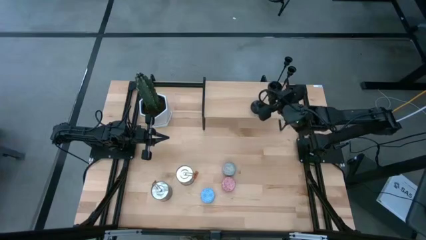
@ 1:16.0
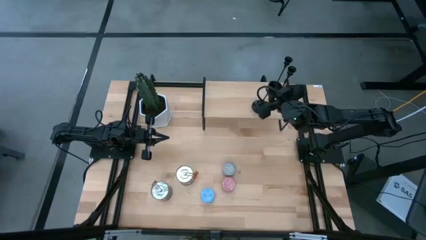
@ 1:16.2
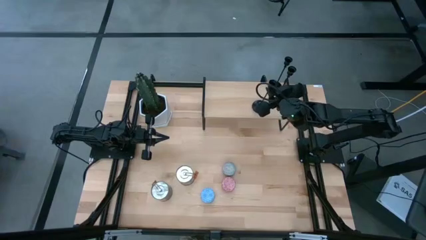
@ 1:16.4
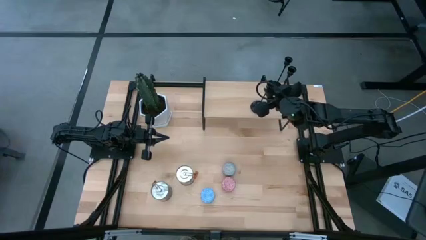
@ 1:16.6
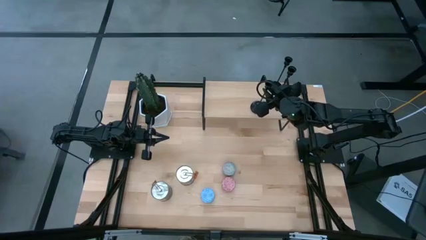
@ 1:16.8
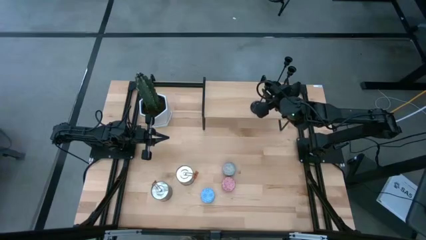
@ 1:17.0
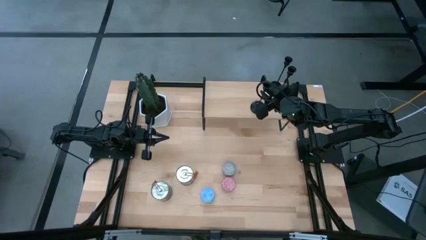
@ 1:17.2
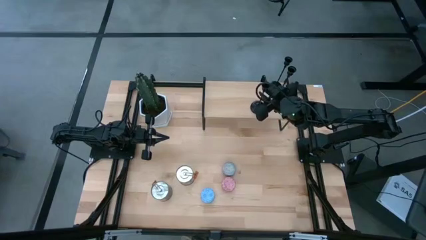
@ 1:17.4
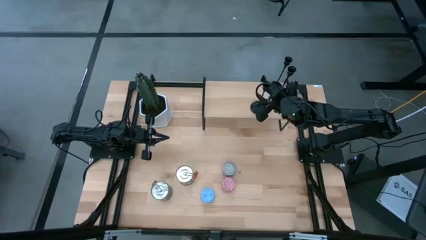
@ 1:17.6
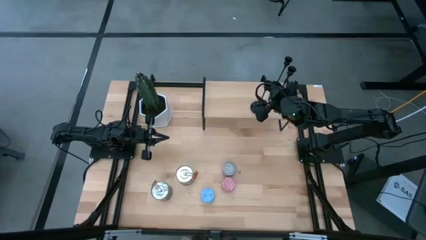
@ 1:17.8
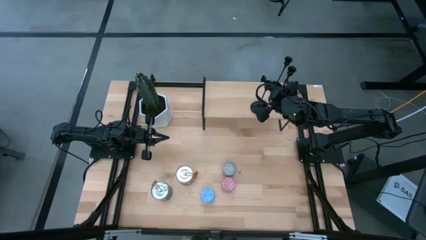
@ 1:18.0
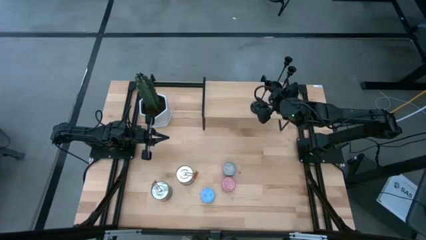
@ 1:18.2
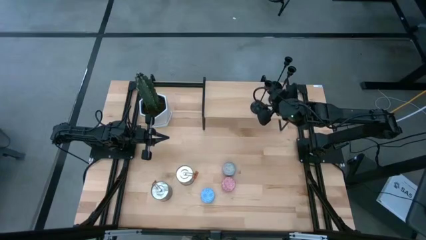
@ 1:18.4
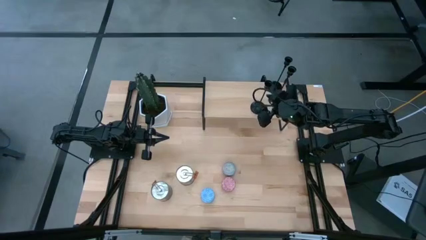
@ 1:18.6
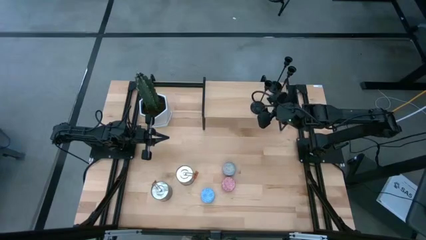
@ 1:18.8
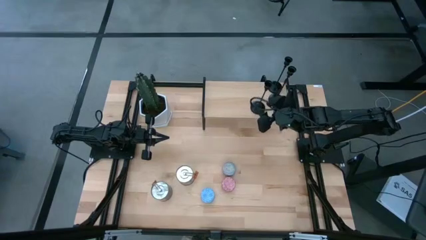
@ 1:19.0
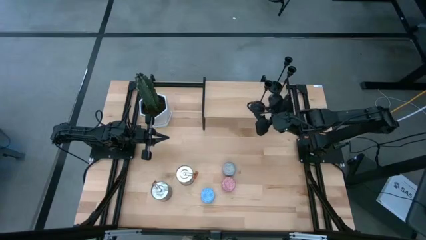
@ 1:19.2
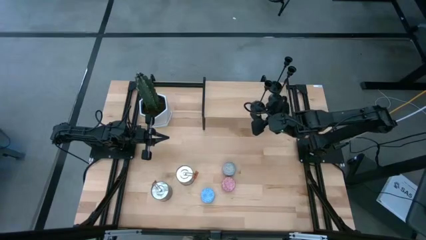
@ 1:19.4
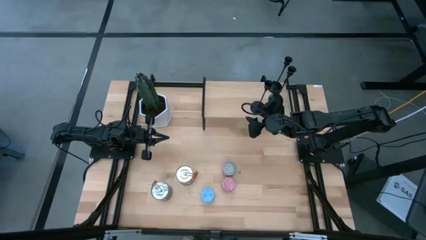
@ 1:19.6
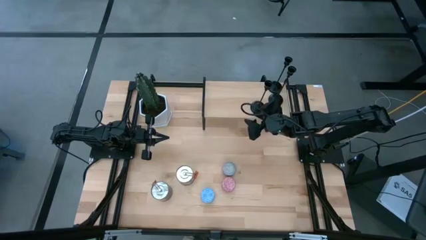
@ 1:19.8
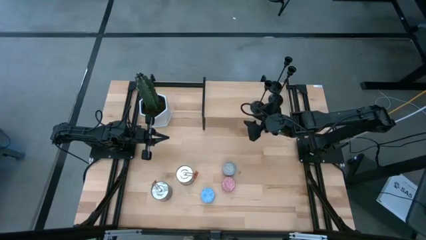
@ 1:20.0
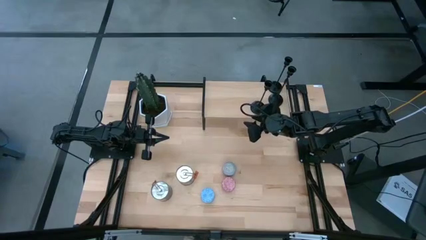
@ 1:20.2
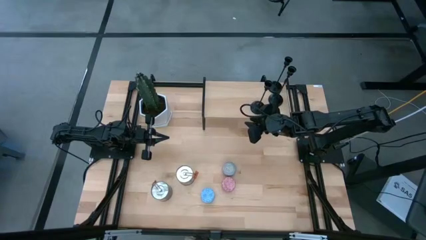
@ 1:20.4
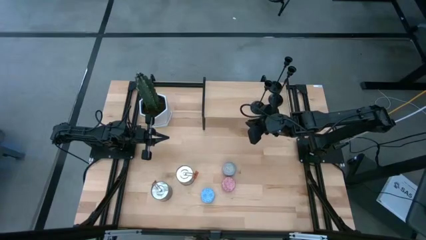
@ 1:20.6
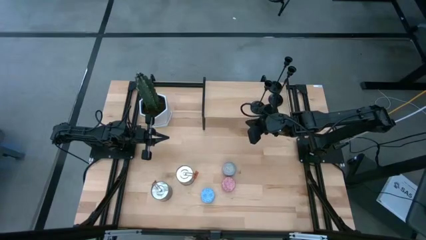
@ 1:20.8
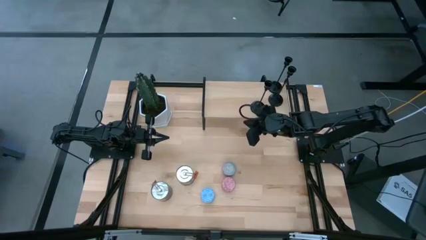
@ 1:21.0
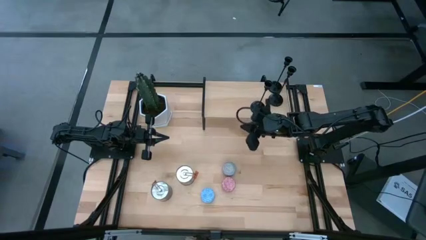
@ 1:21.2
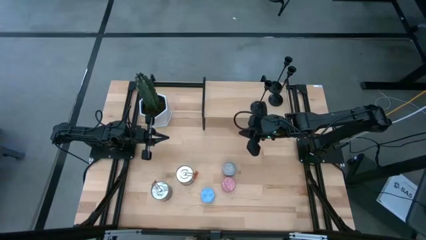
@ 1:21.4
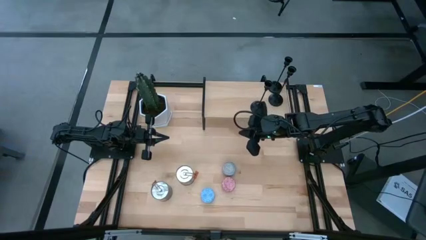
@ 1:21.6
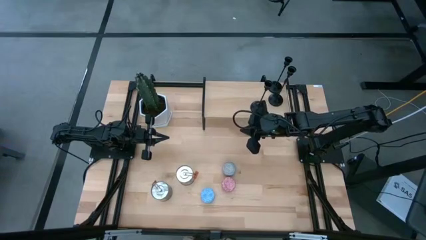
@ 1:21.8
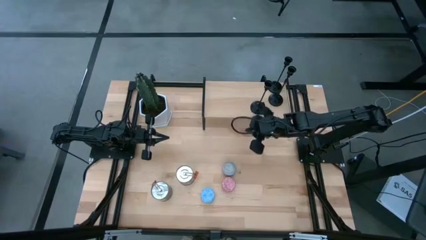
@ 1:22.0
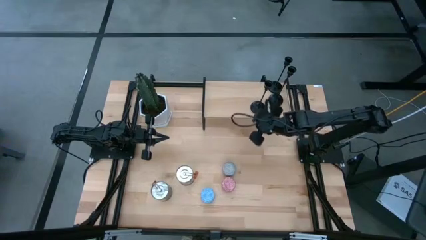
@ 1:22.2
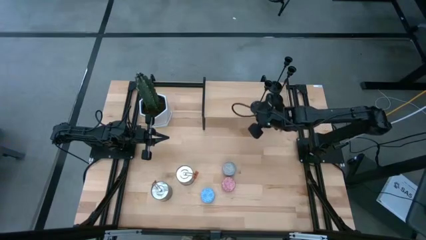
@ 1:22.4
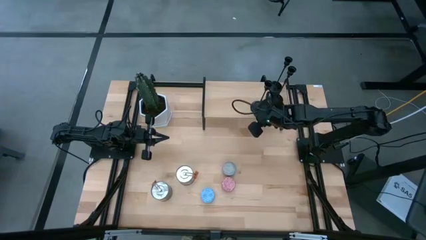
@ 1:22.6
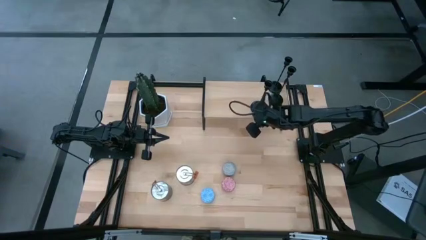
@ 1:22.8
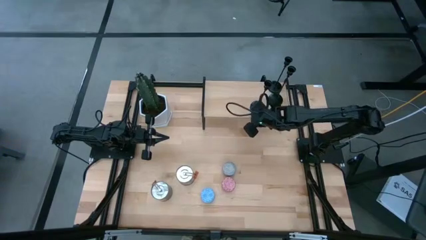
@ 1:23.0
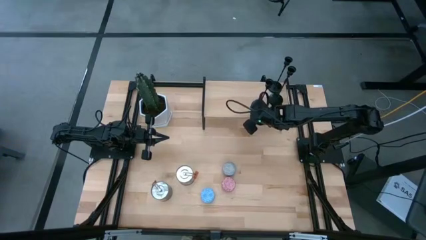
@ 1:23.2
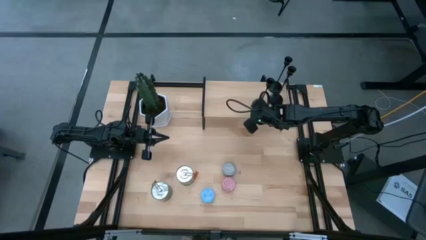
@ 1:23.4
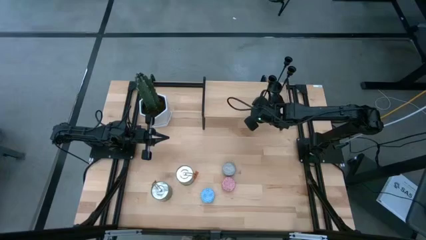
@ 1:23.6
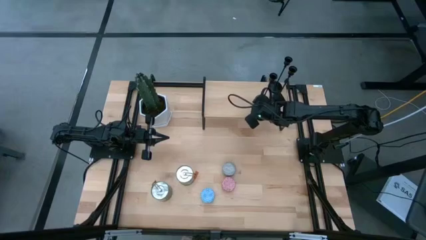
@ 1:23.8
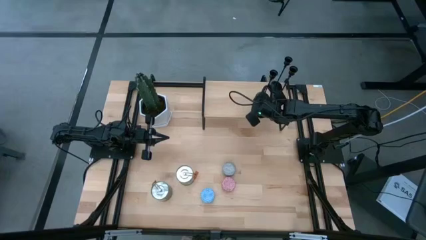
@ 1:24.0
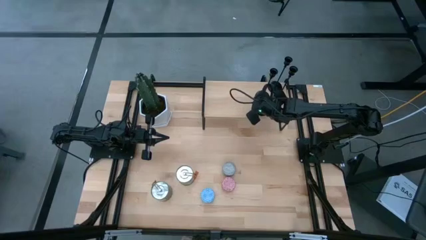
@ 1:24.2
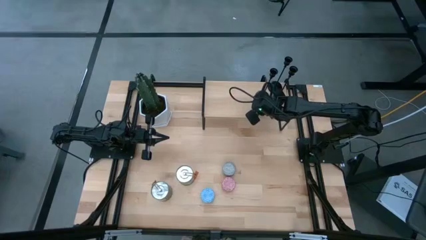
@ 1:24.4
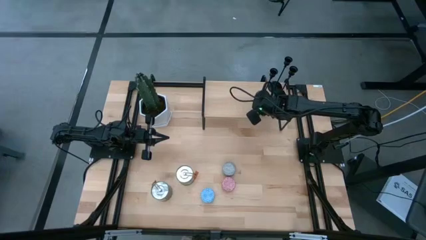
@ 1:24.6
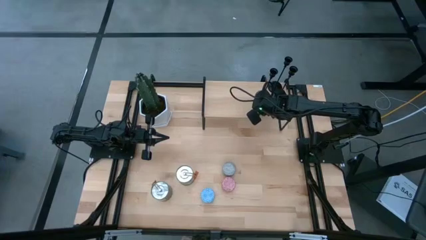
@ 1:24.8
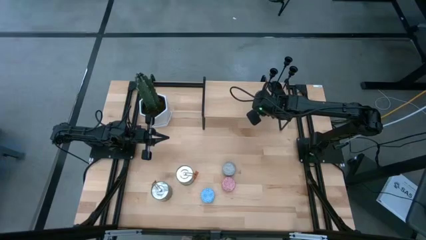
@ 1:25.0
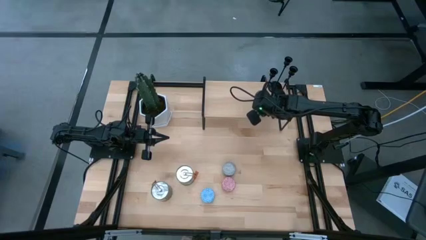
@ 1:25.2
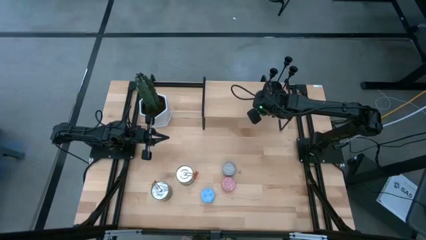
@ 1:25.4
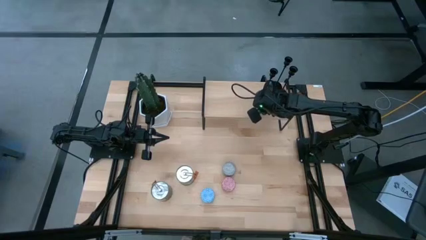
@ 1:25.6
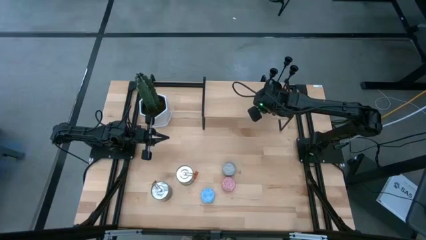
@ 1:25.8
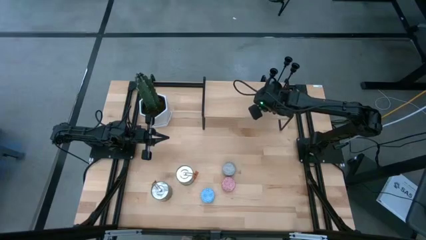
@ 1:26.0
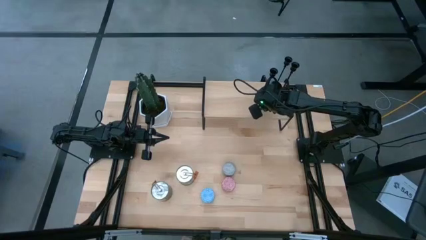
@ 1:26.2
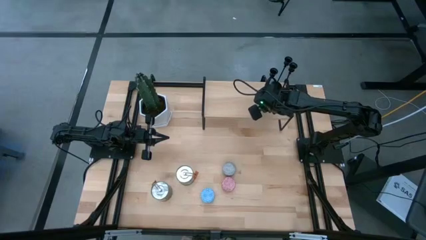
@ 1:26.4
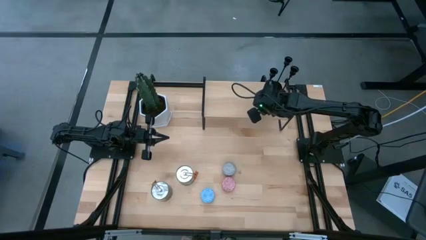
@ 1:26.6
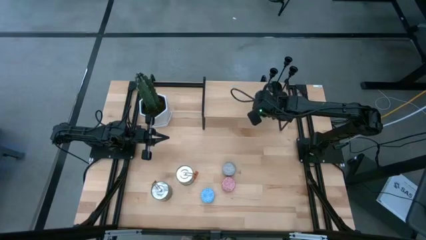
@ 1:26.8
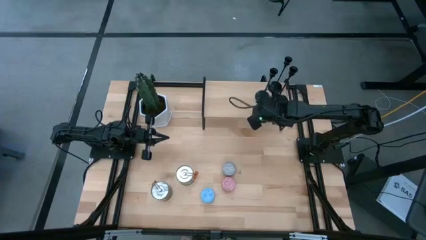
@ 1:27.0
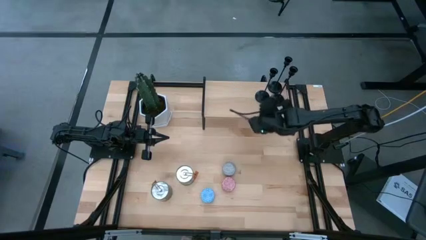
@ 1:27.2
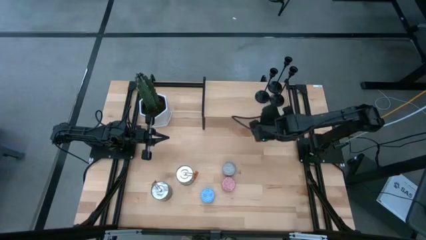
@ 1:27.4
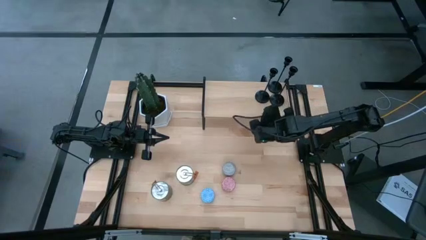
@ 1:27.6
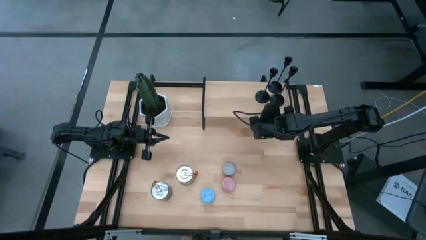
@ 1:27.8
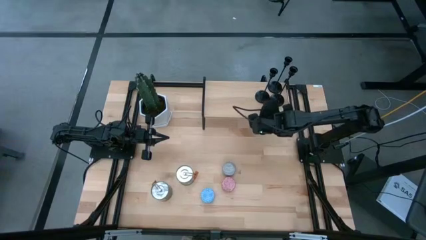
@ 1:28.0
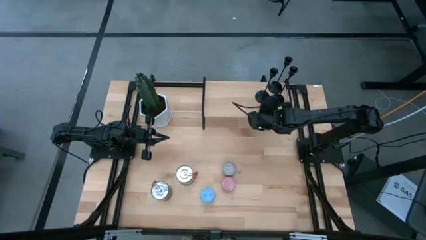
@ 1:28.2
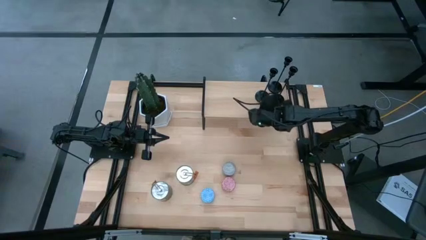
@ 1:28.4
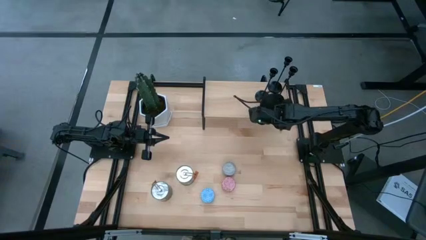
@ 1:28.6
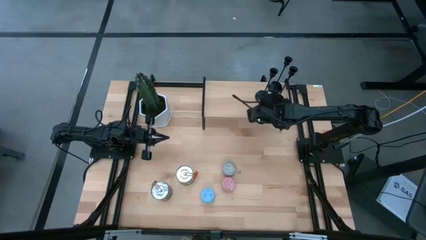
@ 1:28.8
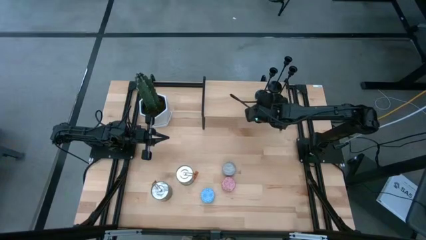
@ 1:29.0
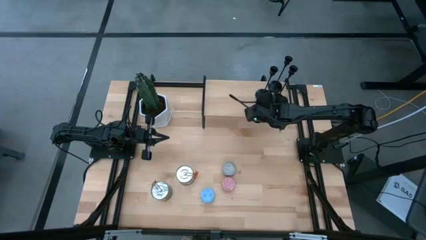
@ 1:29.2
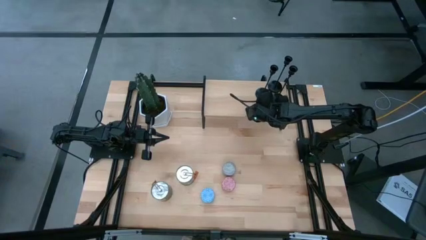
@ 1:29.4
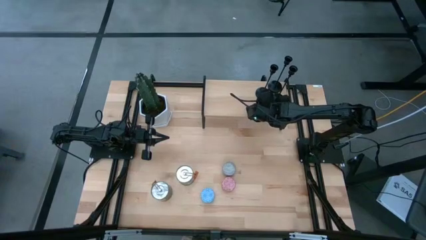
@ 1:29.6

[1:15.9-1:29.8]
Task: Pick & Place candle stick holders
Put the black candle holder on the shelf

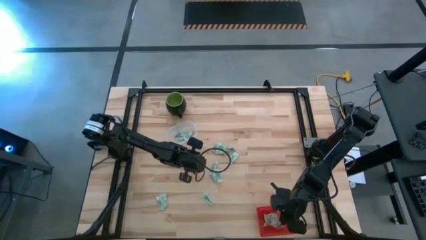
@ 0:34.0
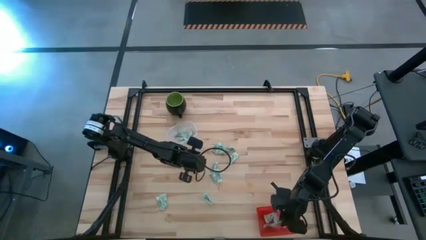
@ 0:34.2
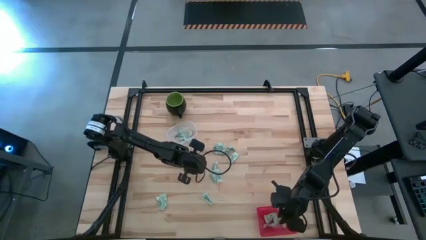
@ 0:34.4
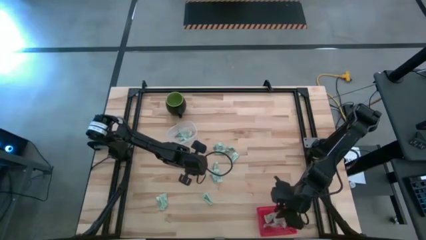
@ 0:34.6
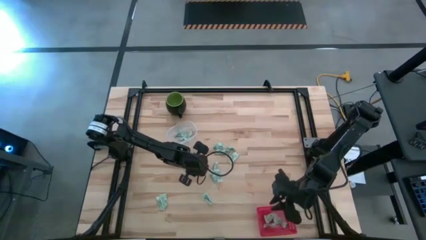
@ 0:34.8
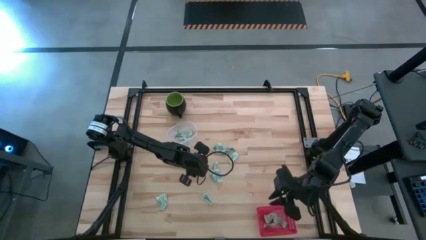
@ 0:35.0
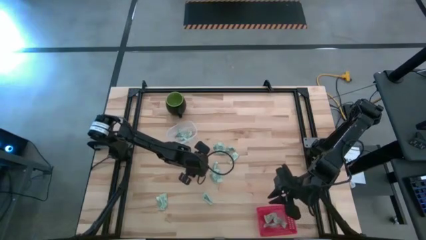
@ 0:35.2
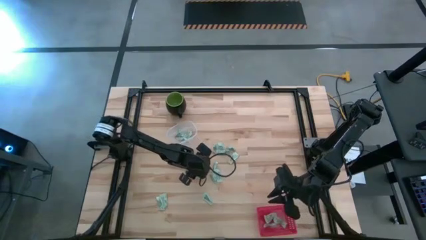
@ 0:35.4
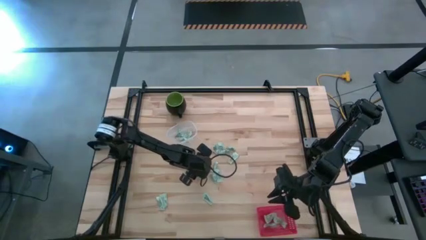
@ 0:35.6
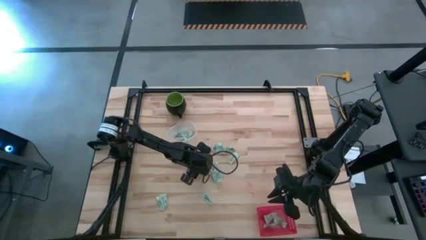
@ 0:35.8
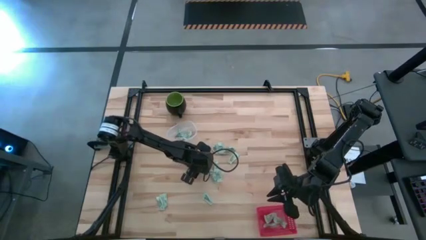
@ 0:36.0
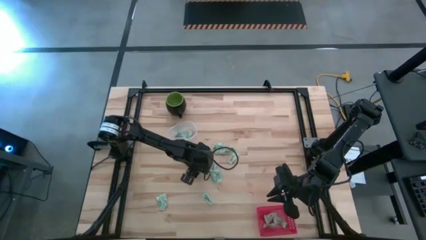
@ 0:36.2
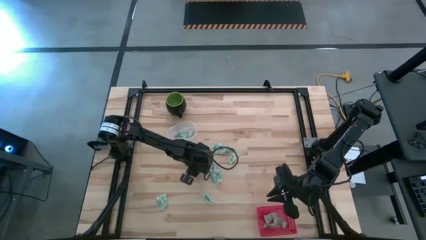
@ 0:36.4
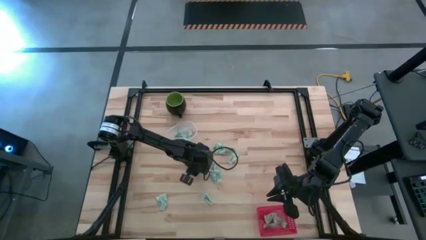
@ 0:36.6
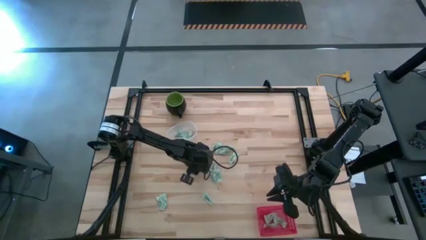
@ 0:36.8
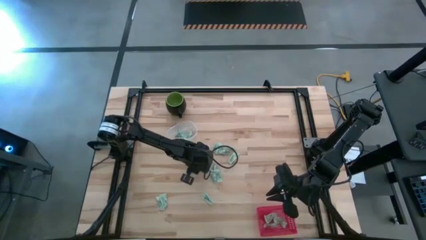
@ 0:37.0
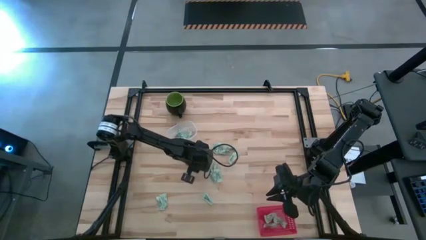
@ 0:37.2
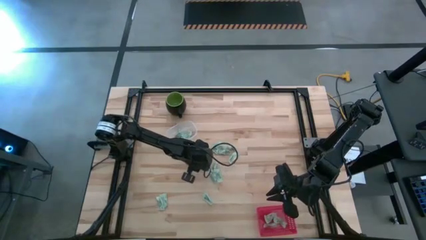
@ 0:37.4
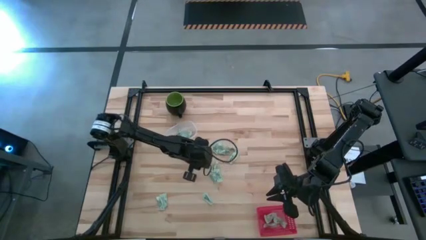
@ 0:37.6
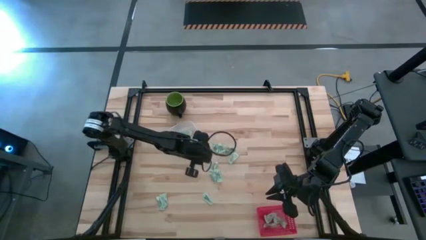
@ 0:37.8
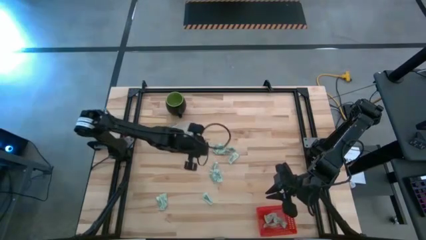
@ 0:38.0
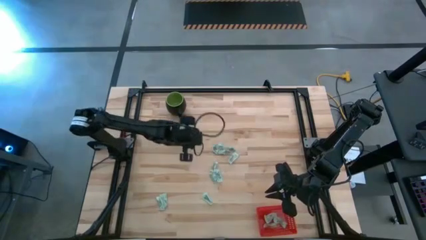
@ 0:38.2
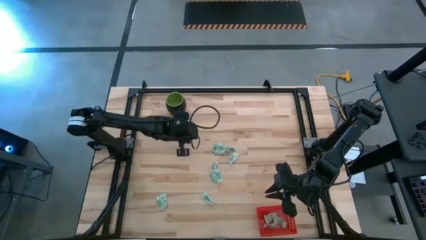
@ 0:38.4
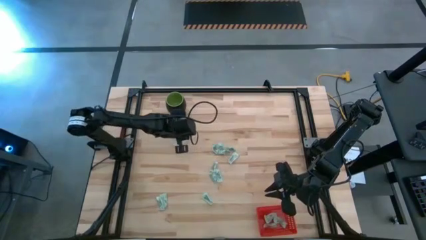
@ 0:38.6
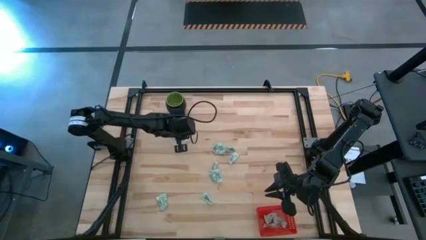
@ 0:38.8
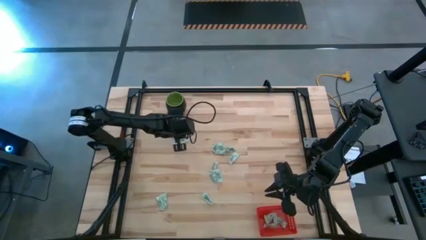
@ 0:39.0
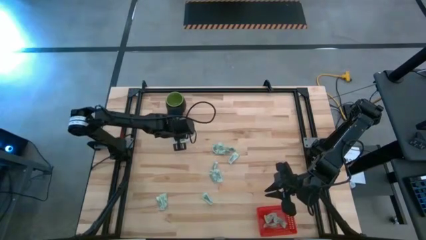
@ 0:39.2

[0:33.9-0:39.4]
Task: Pick and place items into bin
Put the green stevia packet into the transparent bin
